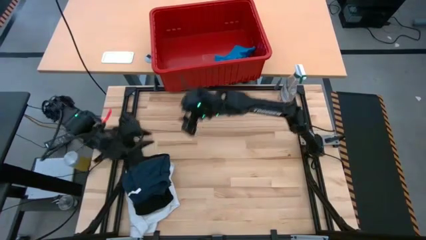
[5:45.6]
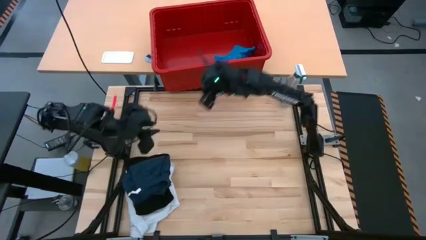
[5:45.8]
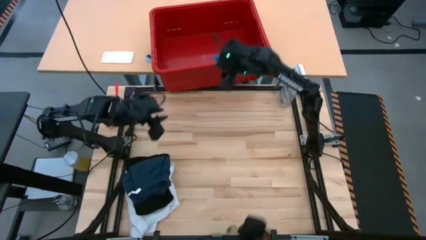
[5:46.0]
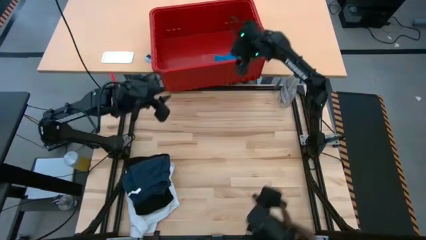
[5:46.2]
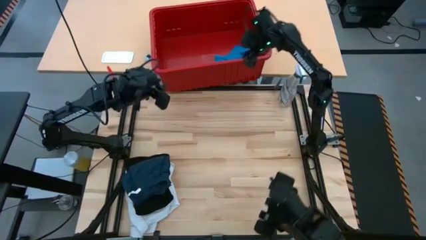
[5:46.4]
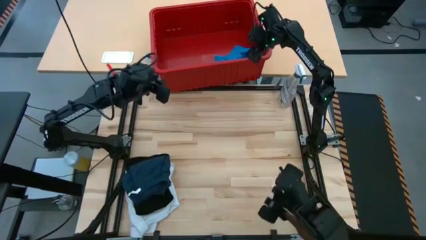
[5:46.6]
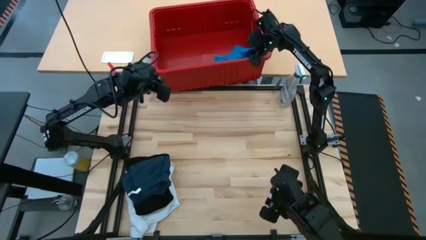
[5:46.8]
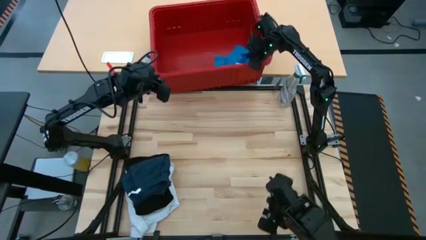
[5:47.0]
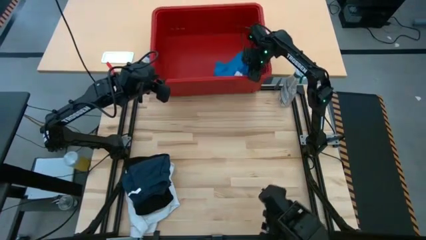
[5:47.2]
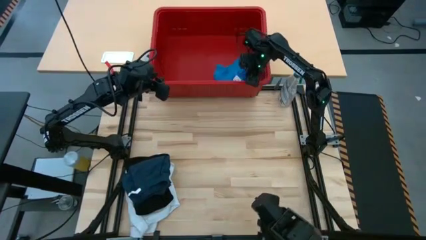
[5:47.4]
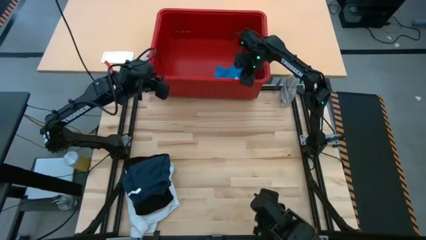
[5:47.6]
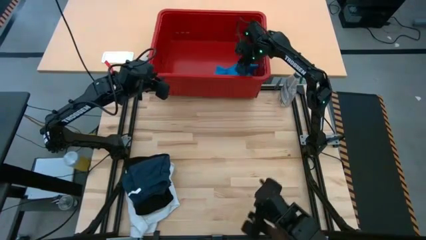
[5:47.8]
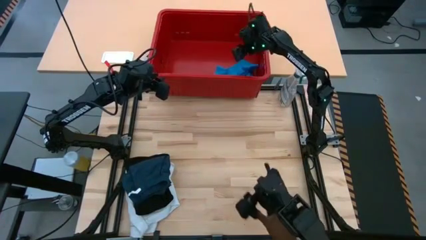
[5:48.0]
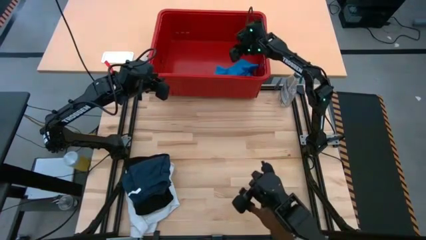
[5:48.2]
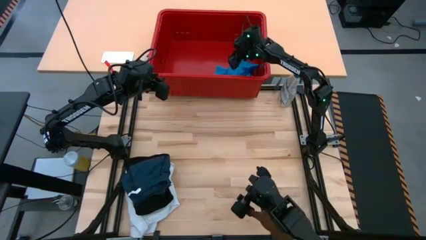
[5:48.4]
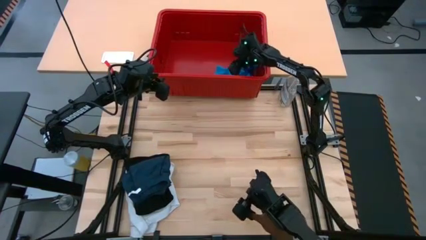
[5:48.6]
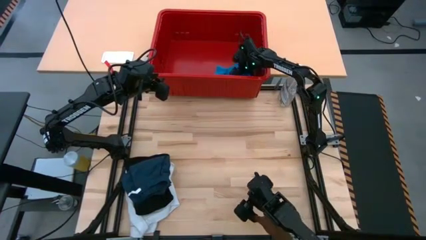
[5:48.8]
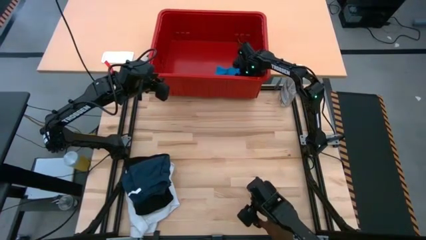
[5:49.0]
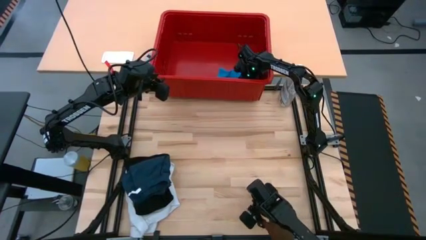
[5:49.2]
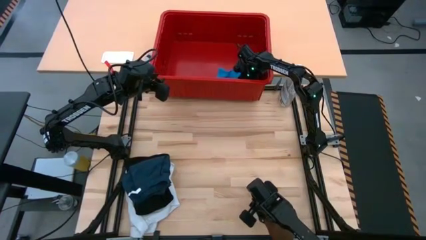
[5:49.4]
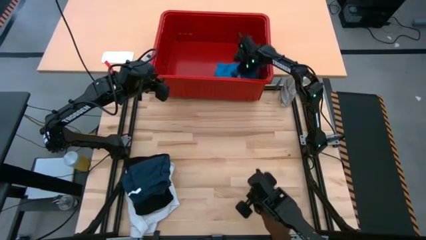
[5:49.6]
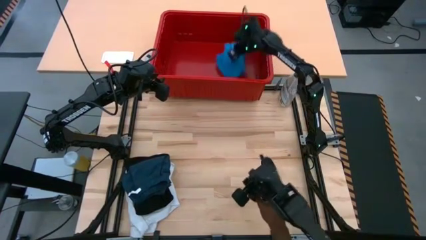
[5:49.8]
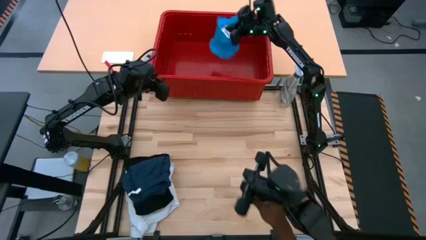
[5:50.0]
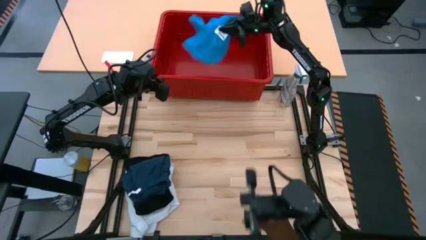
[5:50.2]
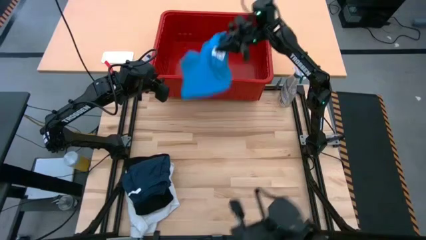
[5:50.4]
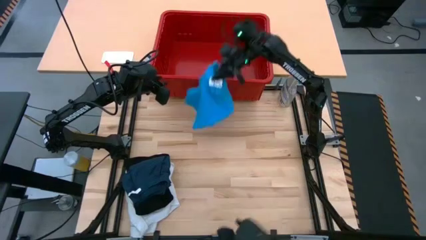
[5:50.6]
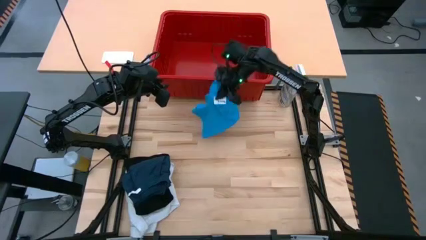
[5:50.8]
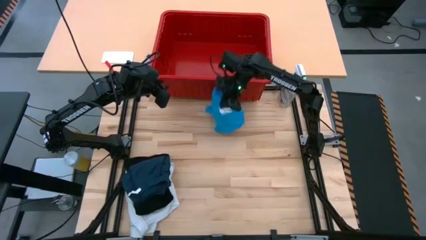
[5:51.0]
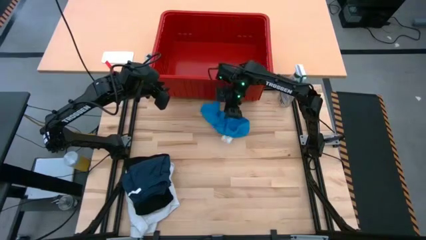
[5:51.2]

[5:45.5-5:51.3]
Task: Fold Laundry from Bin
Remove the blue shorts from the red bin and place them on the table

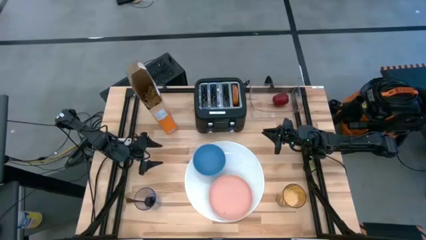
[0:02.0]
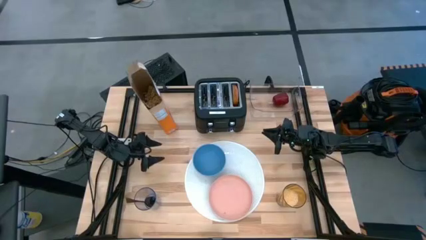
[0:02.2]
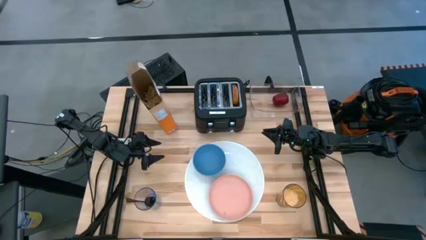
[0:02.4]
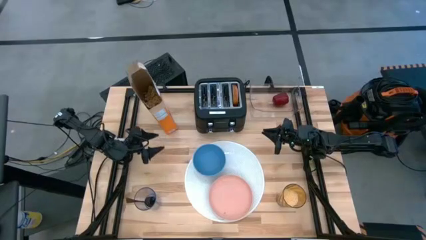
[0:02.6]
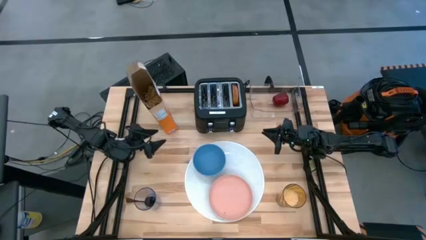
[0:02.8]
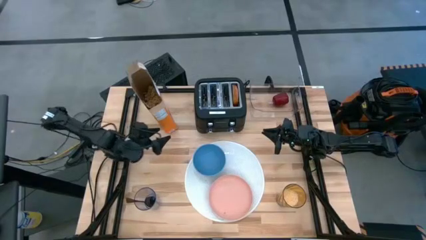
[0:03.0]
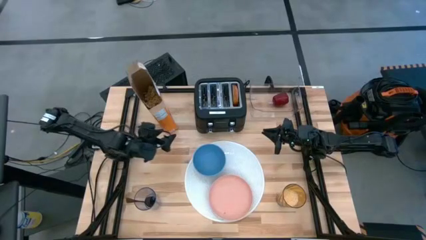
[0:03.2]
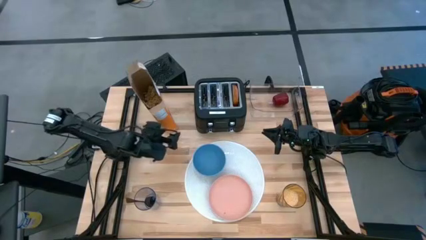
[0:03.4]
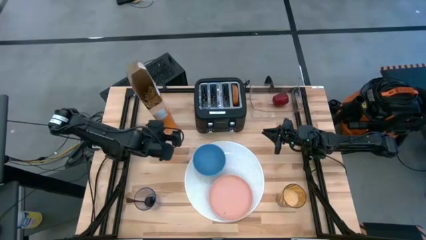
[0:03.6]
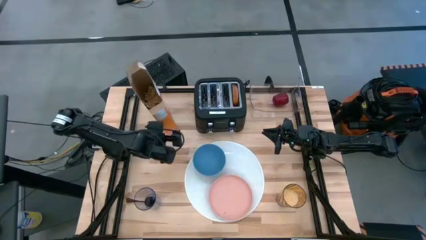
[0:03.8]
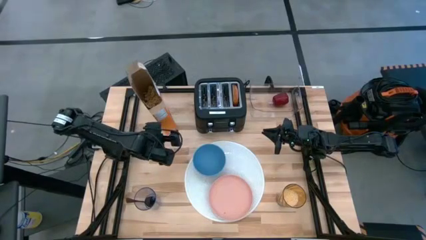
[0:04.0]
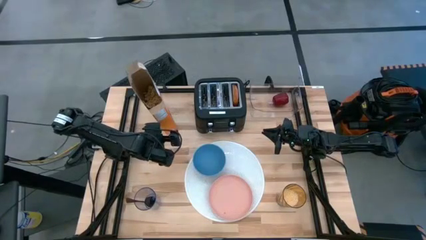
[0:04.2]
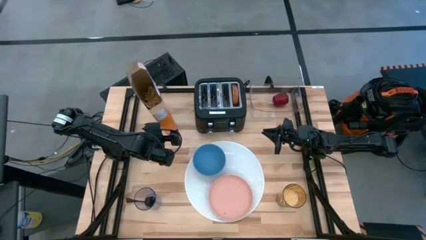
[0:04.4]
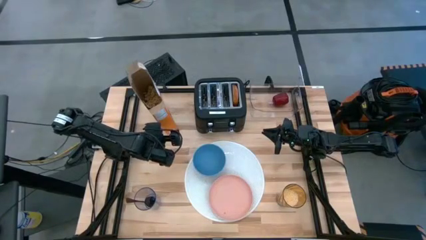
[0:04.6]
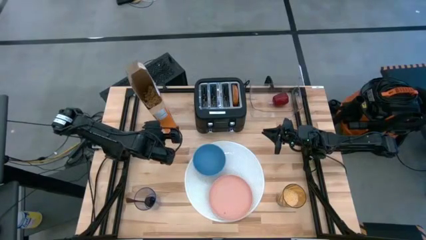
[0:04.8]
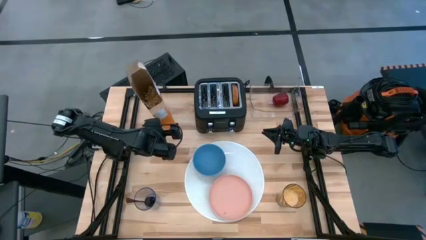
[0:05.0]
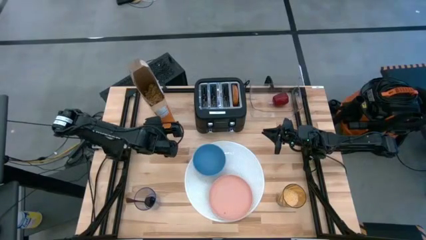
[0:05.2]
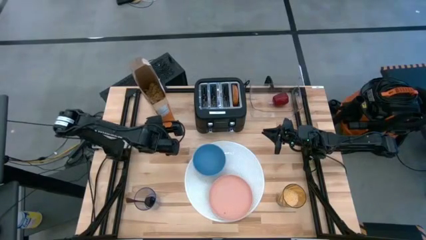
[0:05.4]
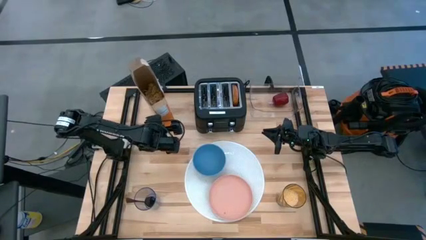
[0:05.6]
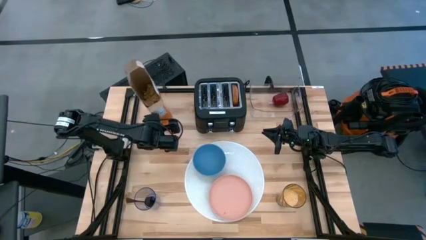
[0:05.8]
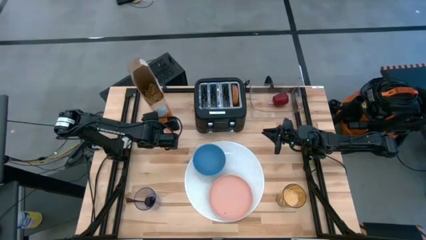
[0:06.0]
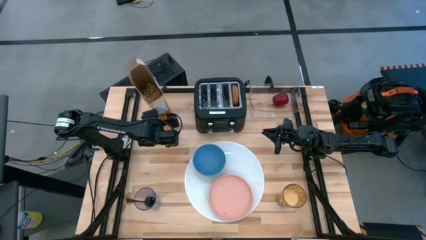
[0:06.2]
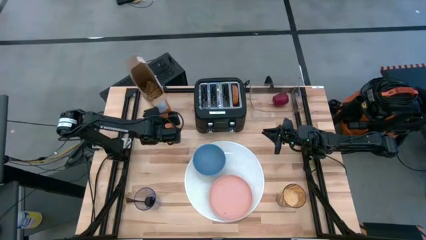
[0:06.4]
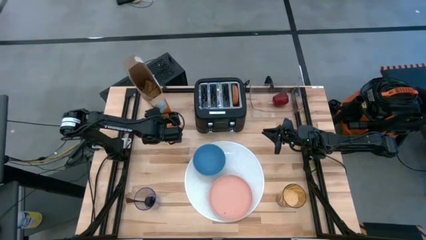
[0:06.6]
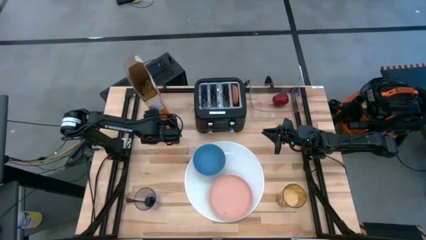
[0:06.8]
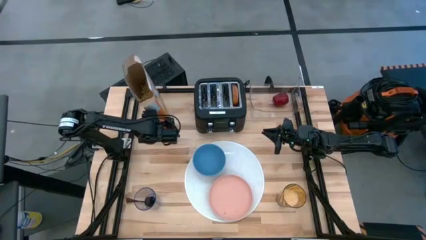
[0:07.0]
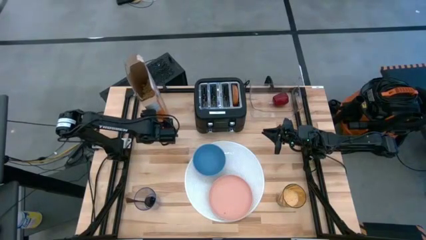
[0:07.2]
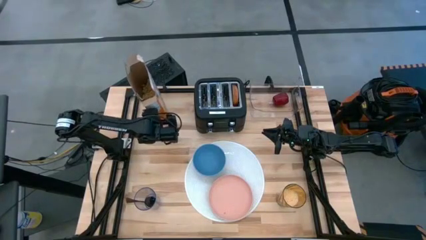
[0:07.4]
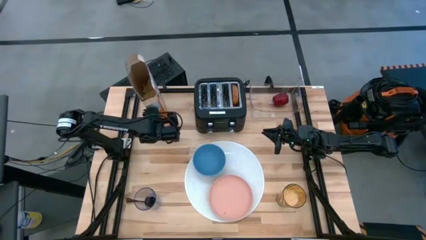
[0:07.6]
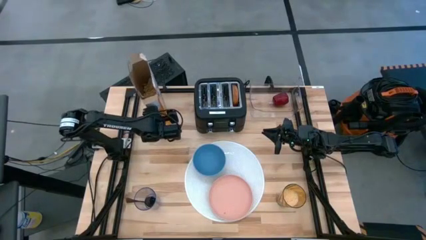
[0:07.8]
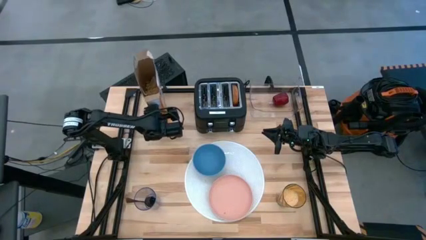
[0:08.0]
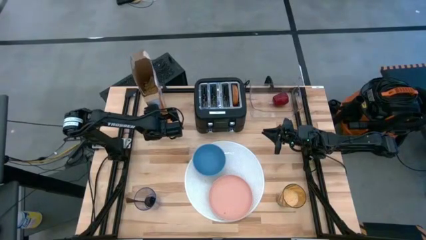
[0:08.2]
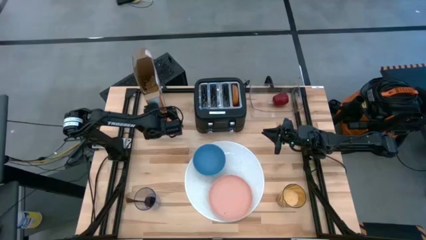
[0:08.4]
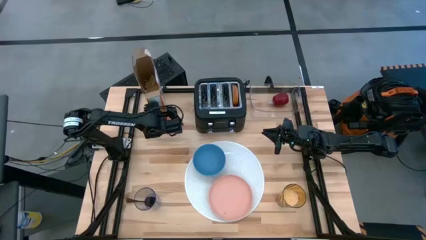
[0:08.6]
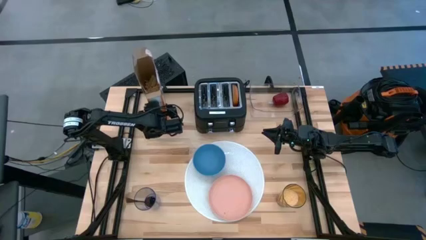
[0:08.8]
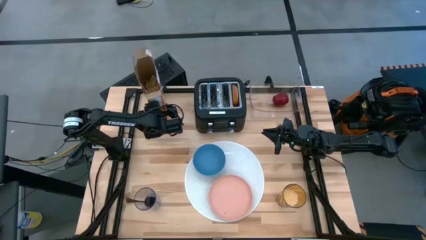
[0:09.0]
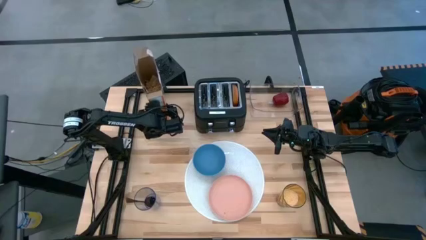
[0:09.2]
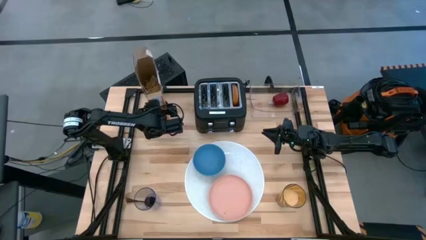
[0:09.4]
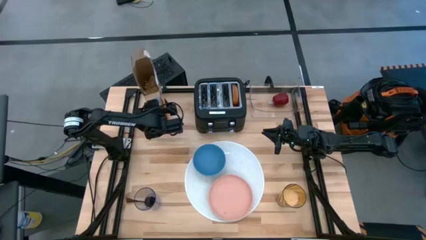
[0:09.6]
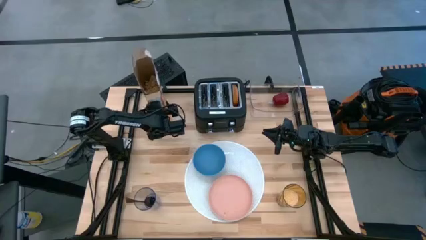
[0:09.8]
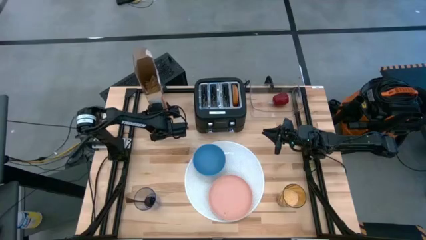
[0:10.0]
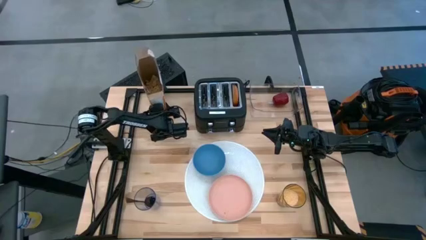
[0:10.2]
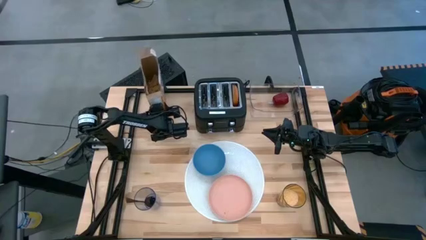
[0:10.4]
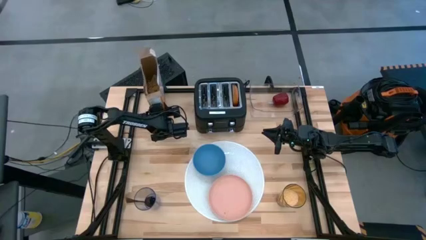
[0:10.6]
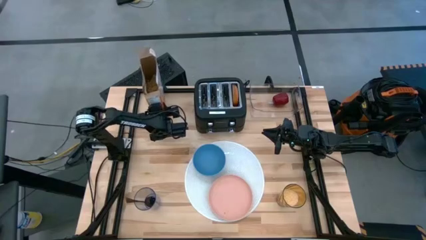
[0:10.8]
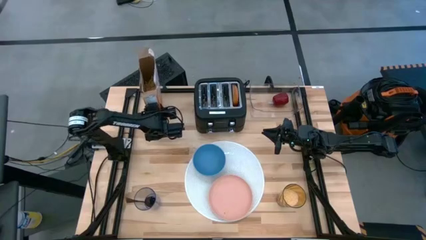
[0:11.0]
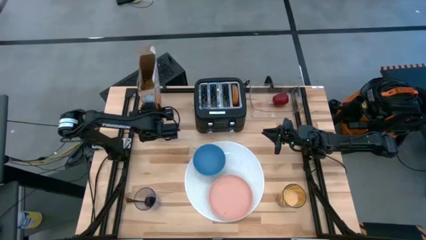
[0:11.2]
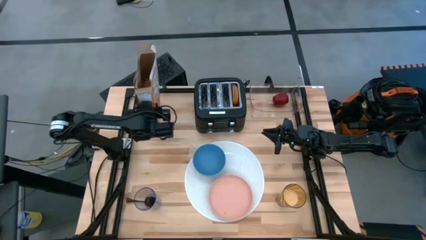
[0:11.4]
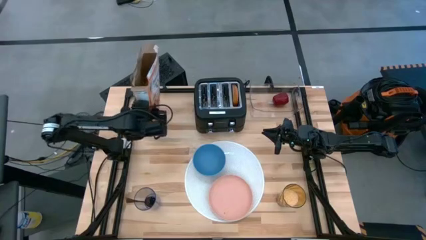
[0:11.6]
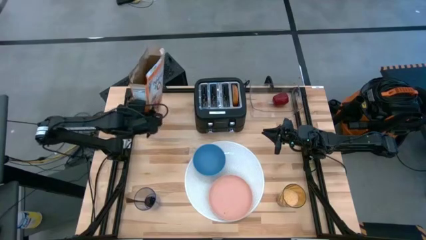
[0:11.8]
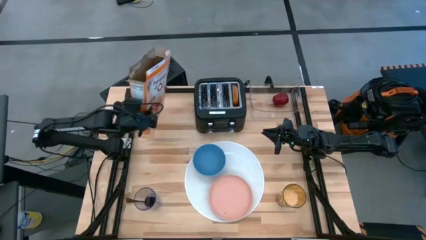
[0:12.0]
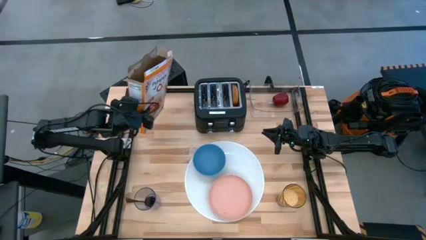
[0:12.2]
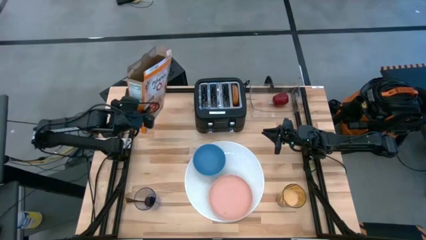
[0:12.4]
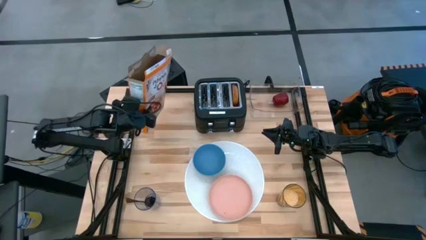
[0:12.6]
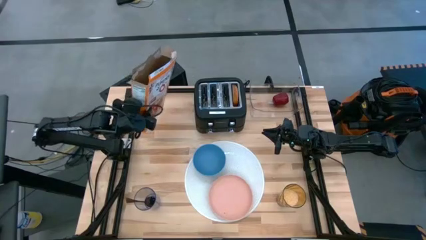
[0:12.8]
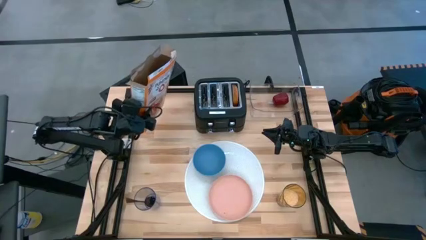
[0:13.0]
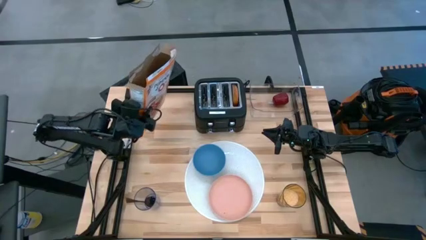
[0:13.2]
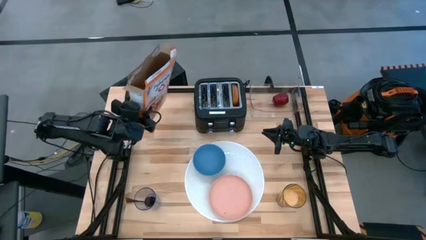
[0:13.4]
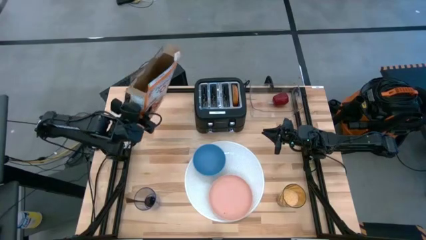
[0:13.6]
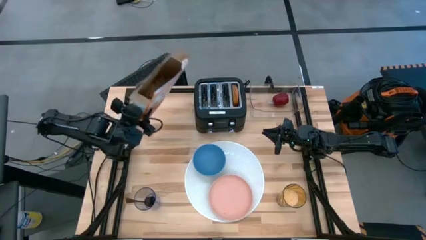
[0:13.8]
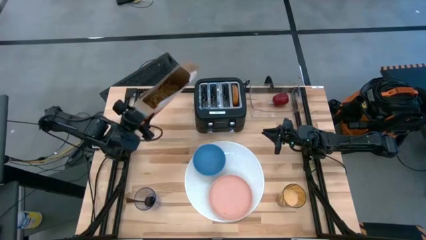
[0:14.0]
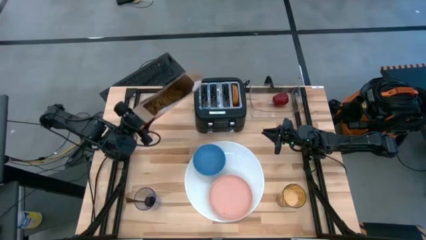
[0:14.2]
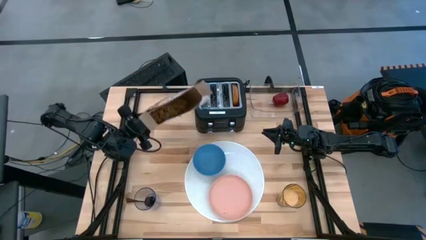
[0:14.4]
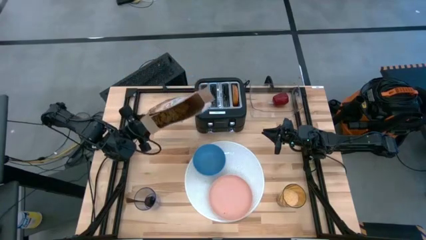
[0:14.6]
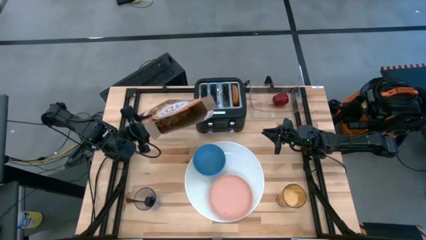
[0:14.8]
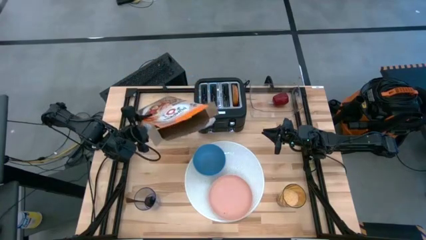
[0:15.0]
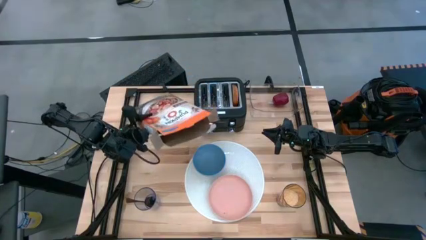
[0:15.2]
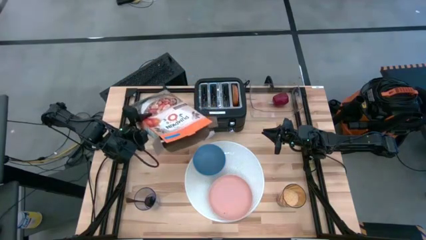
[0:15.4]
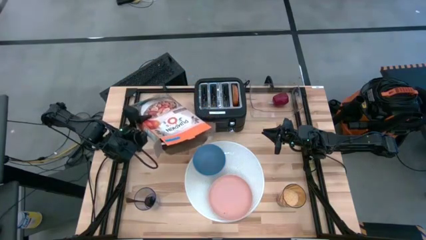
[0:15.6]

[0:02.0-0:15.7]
Task: Arrange a breakfast setting
Pour the cereal into the blue bowl
